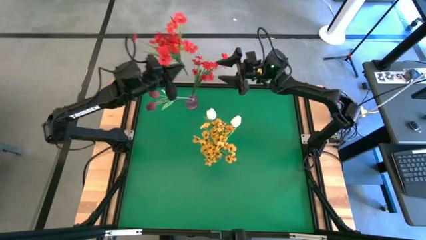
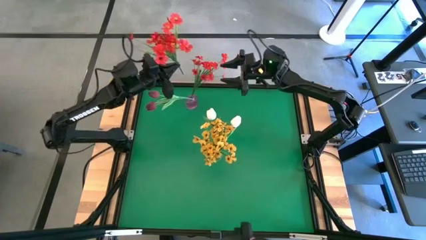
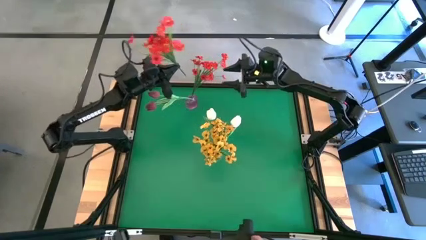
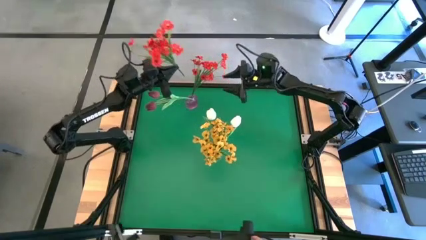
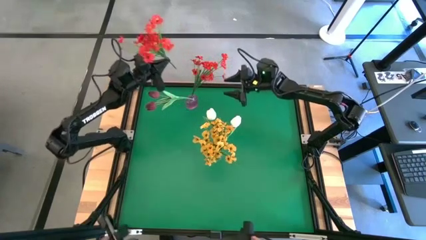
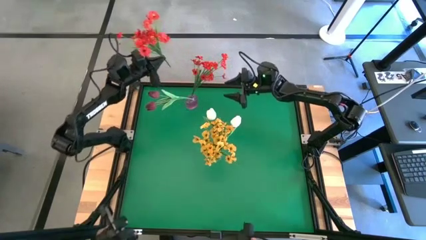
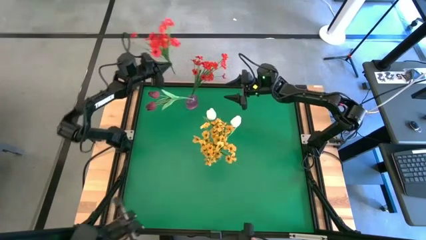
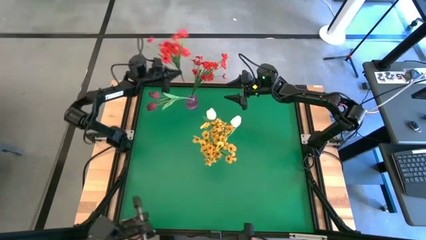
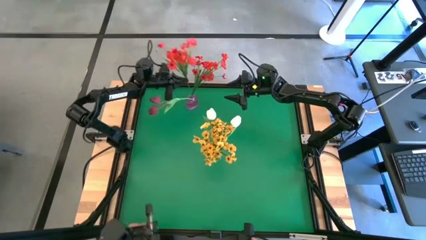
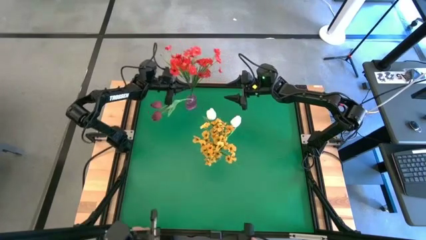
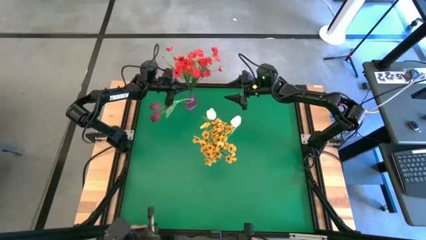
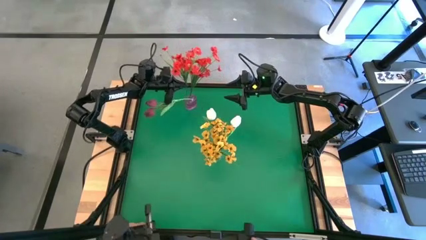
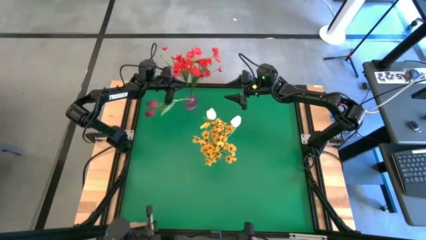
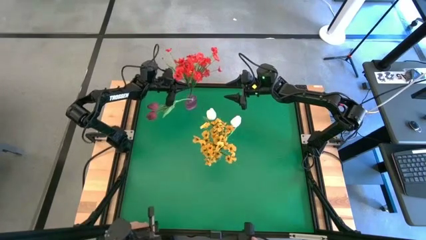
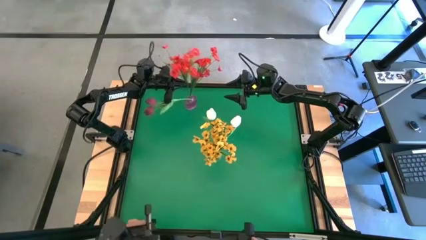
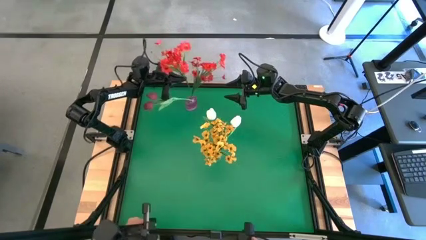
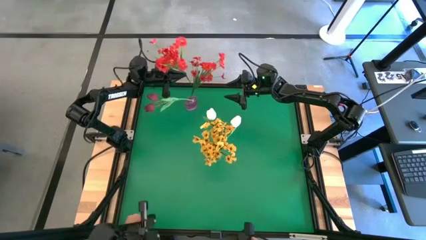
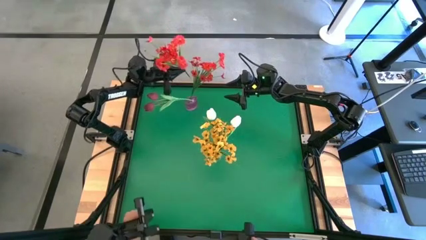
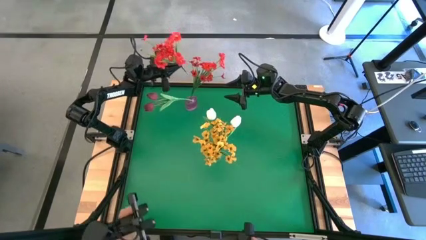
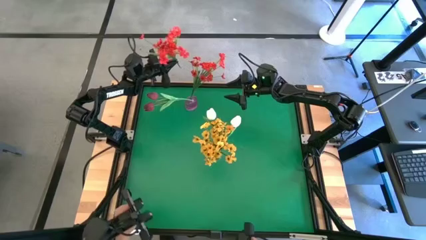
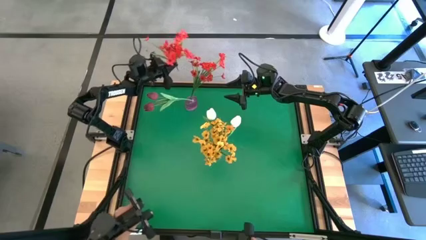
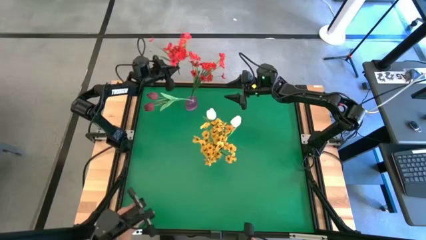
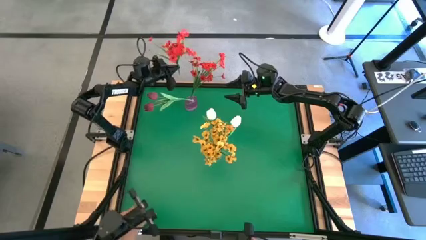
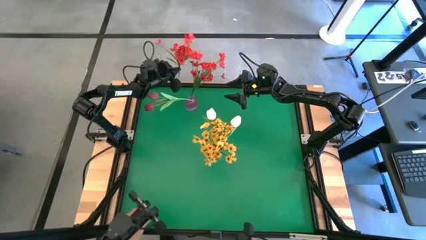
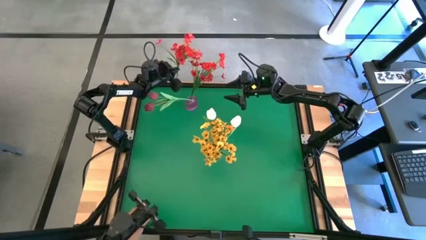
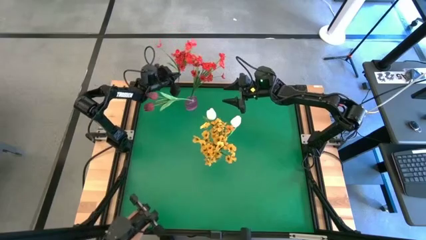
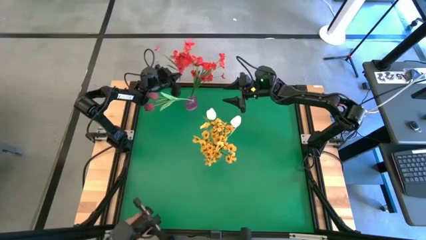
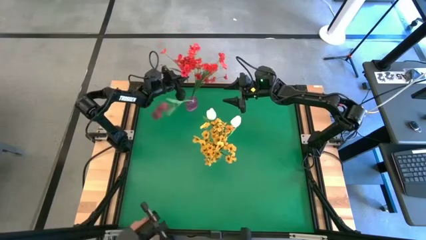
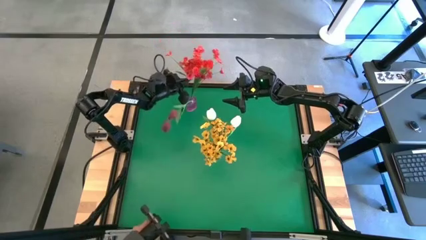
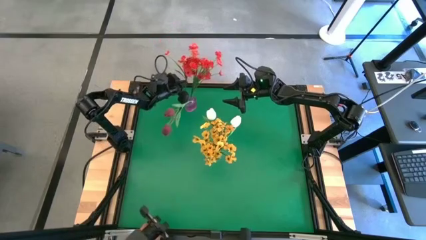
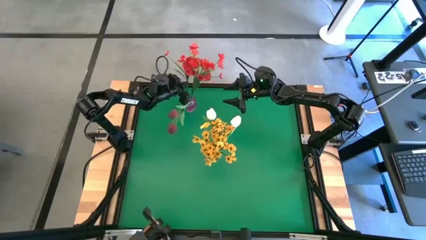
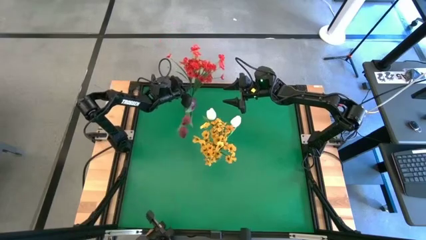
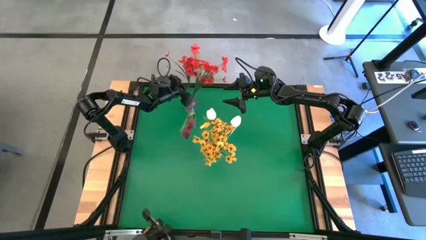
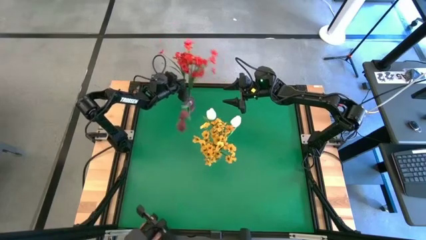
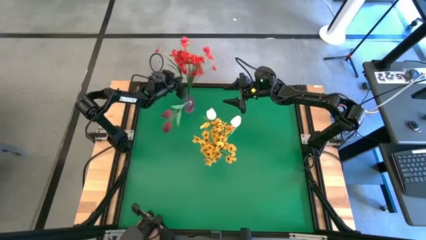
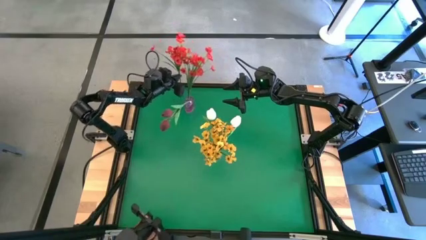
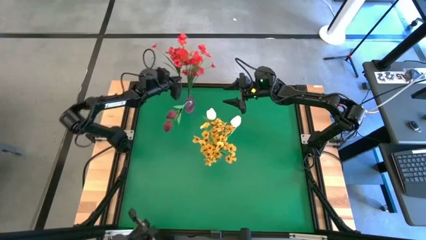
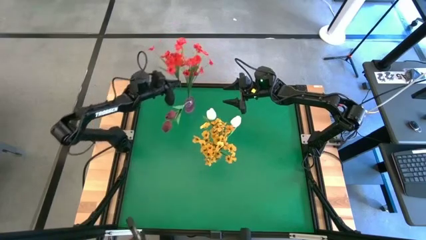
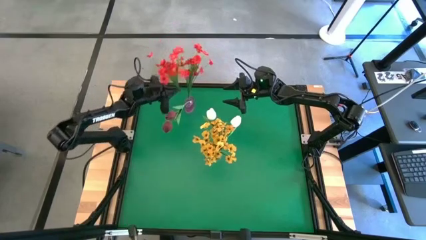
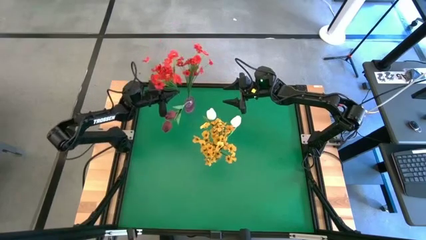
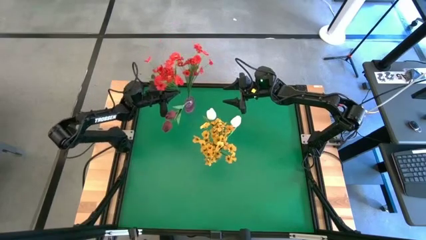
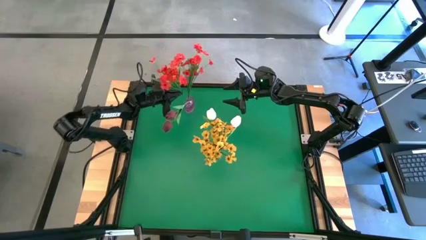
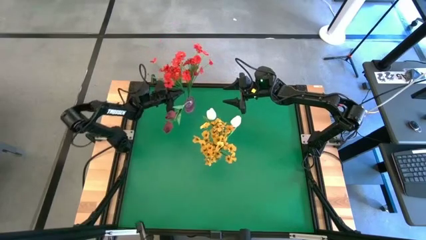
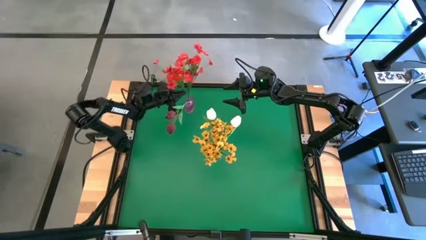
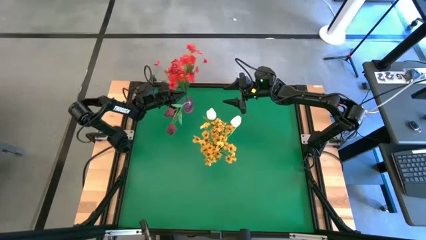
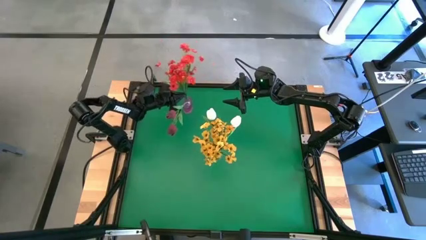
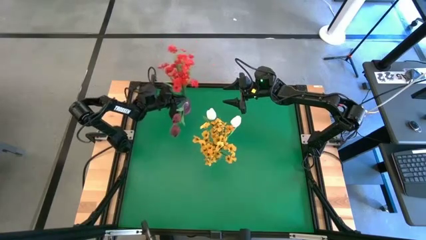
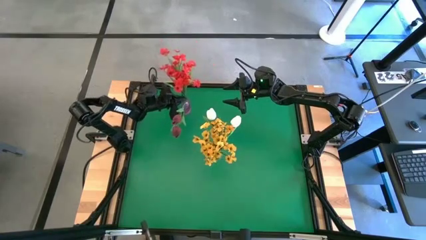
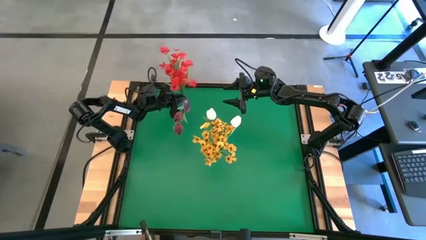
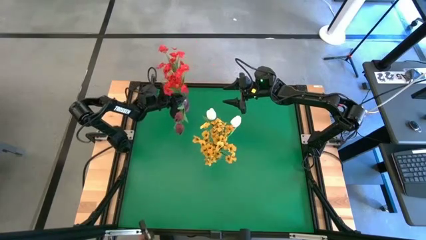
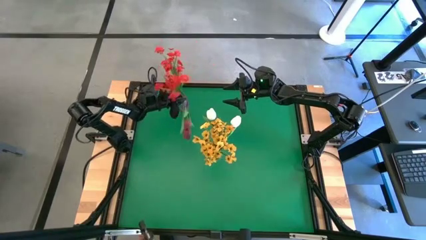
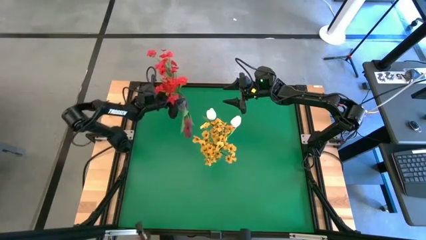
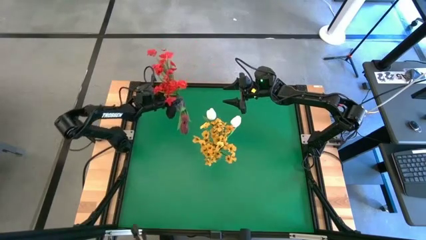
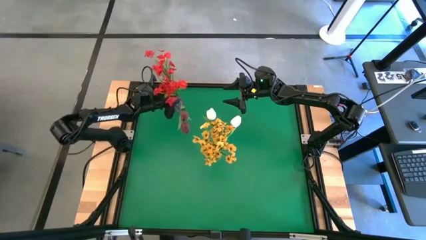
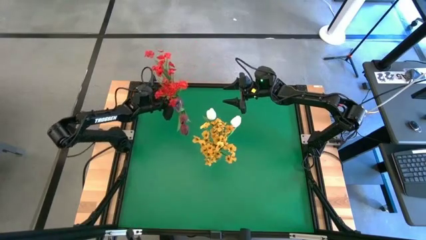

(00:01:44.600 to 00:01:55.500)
Task: Sort flowers into vase by color
Put the red flowers into the pink vase
